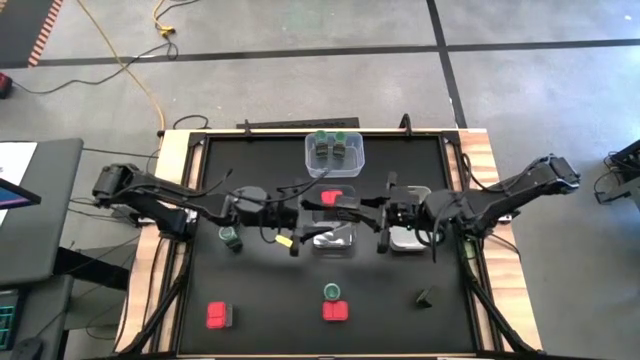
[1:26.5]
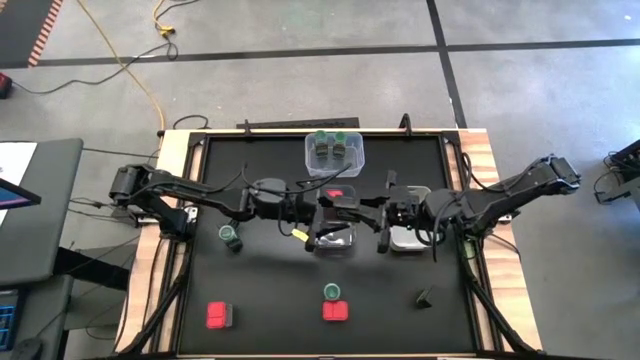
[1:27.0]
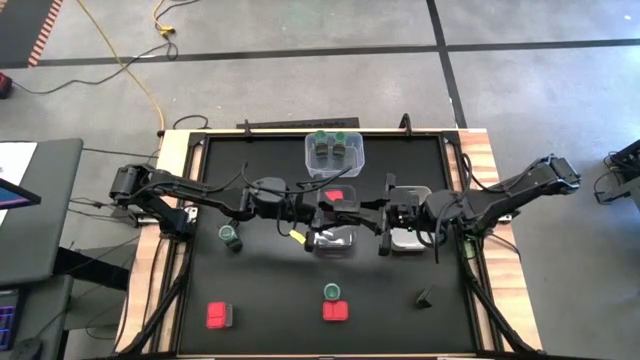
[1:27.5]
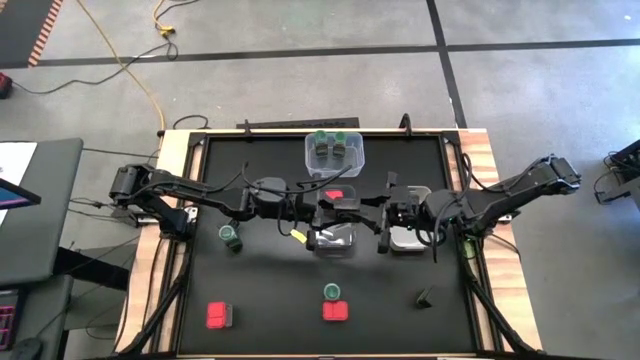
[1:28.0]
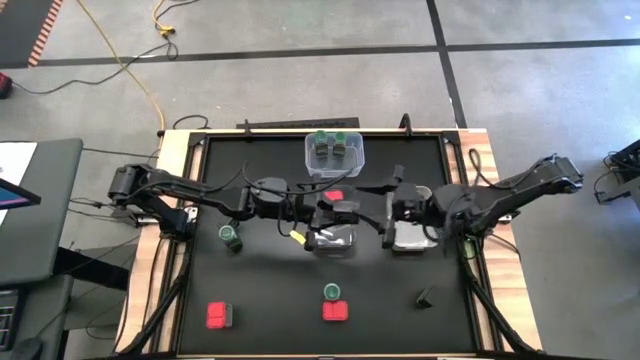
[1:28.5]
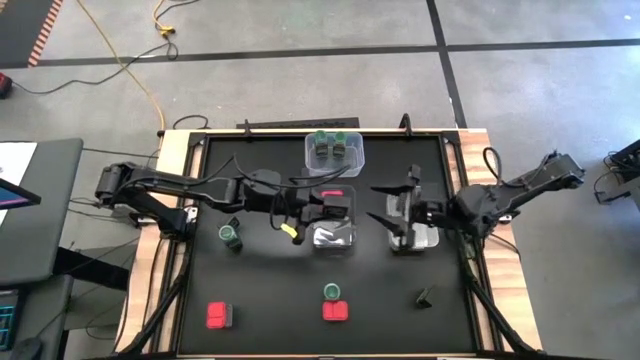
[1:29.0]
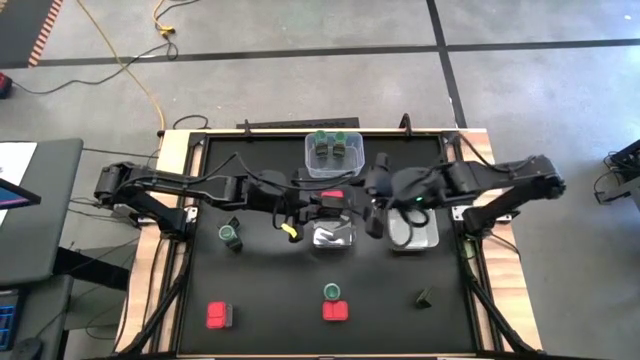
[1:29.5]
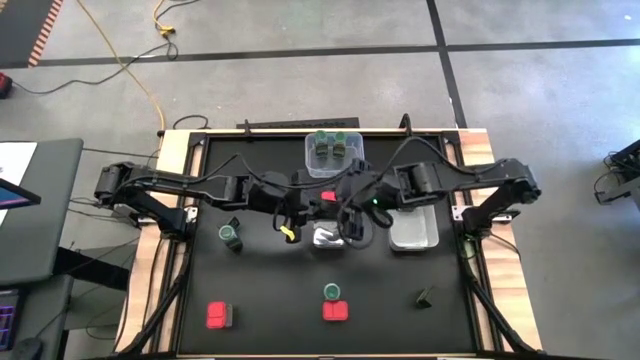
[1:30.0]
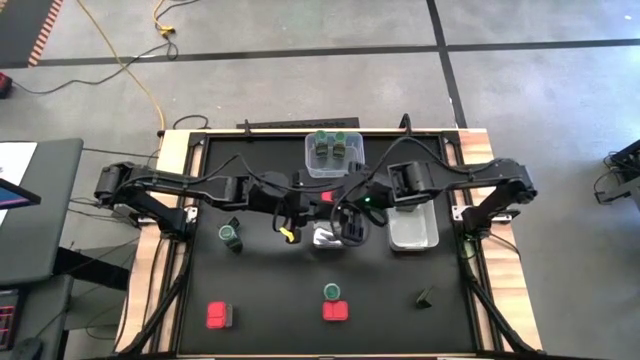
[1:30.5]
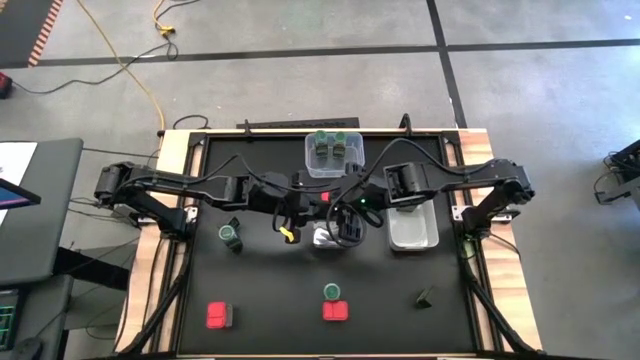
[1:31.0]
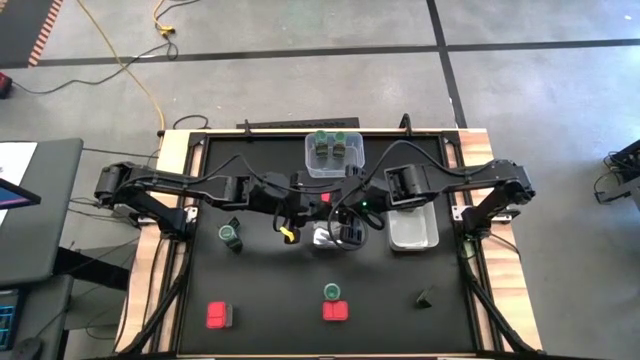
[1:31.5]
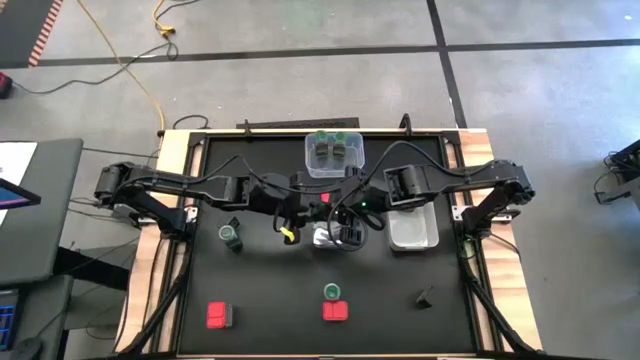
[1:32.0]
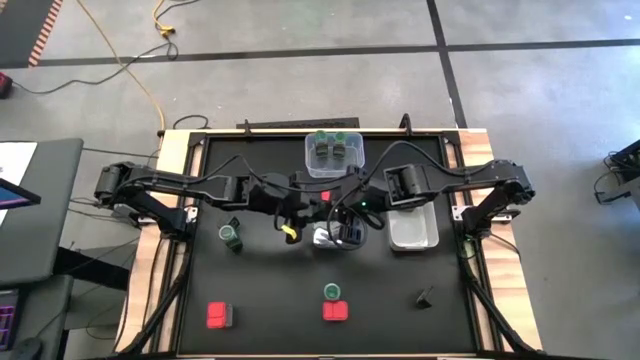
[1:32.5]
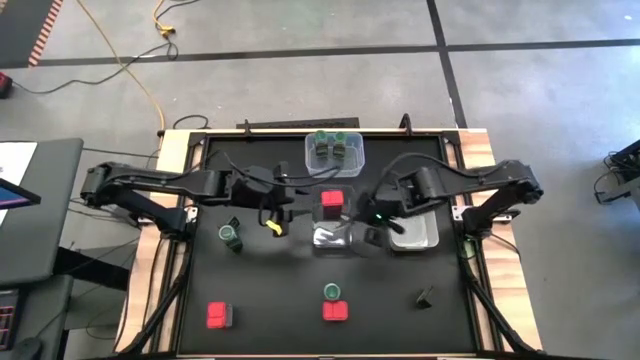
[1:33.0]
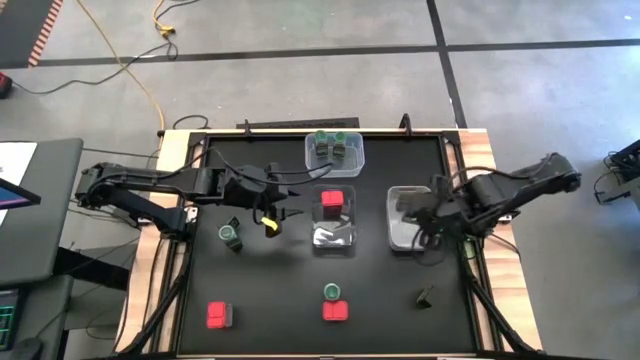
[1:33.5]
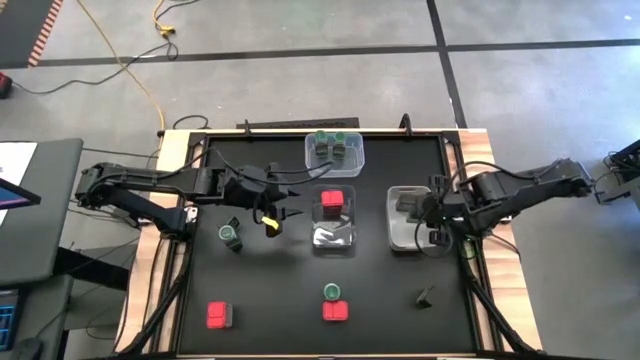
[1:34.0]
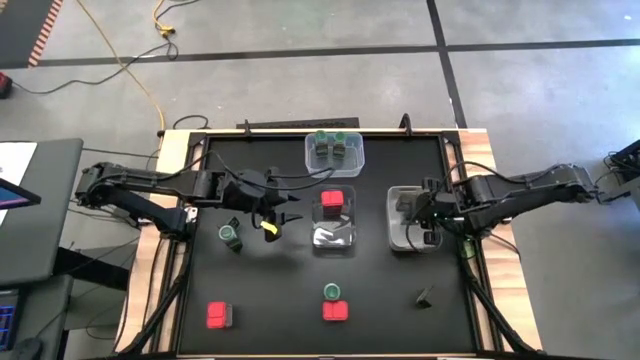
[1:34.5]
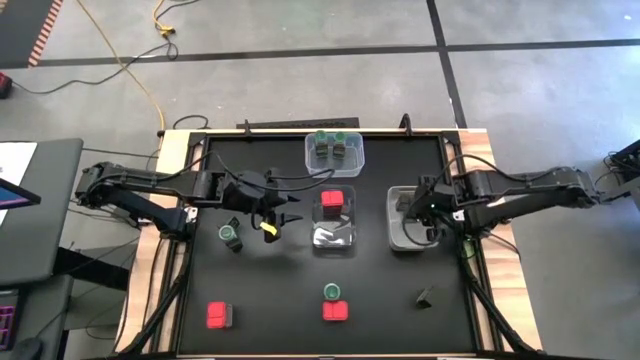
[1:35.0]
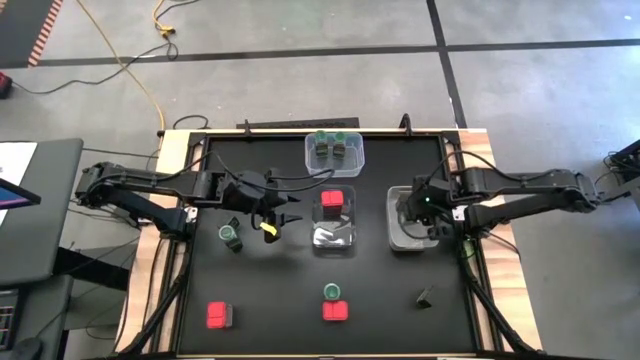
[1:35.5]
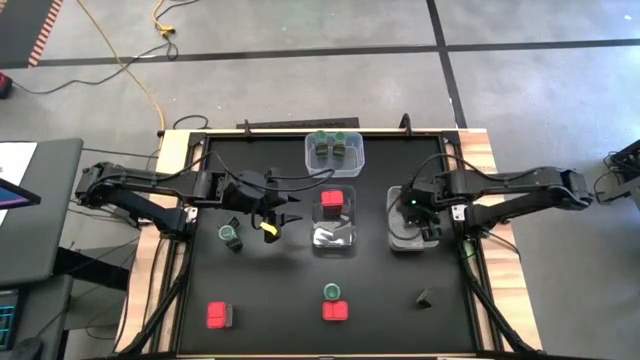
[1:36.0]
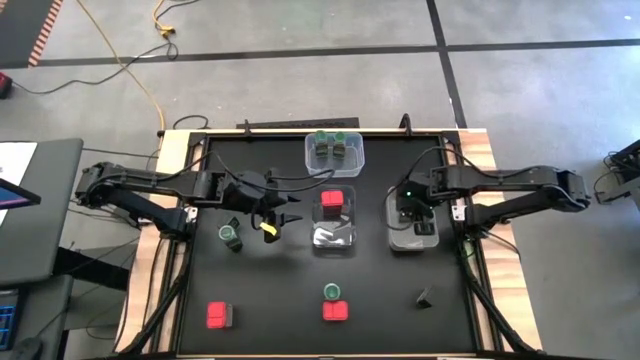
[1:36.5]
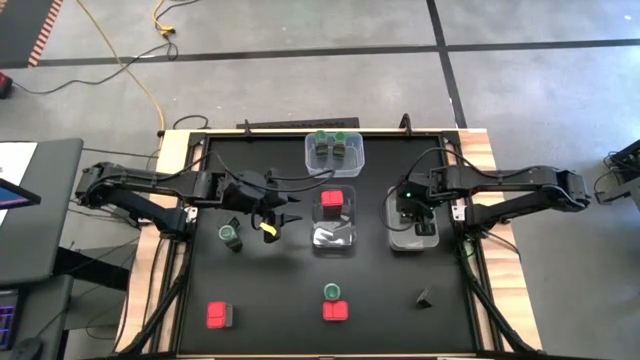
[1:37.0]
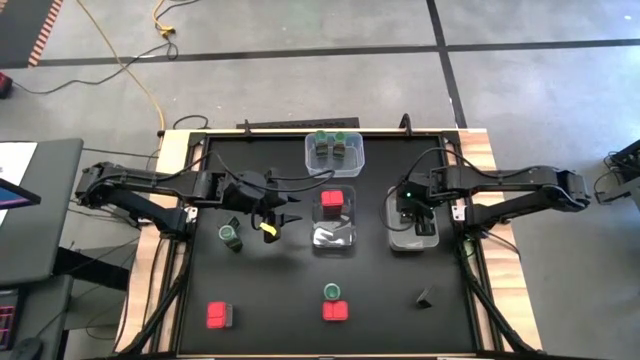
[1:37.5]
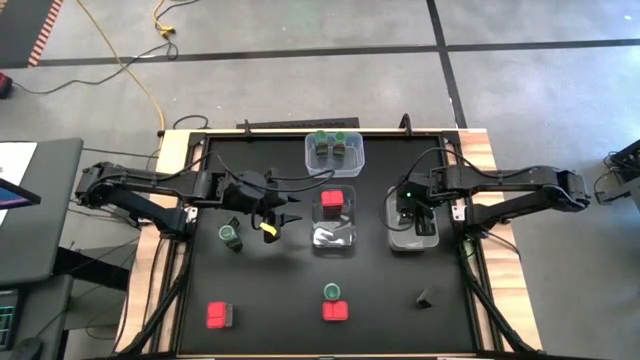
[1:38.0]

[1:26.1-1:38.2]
Task: Sort spices by type
Put the black seasoning can into the gray bin

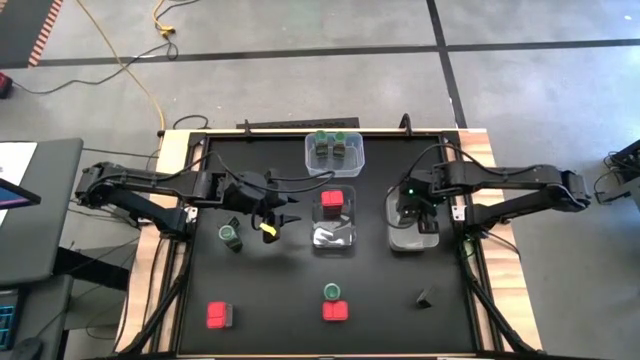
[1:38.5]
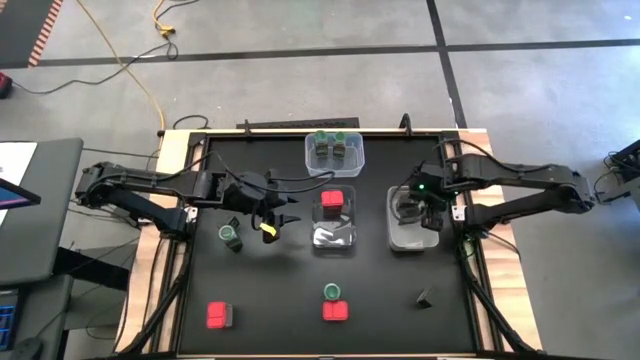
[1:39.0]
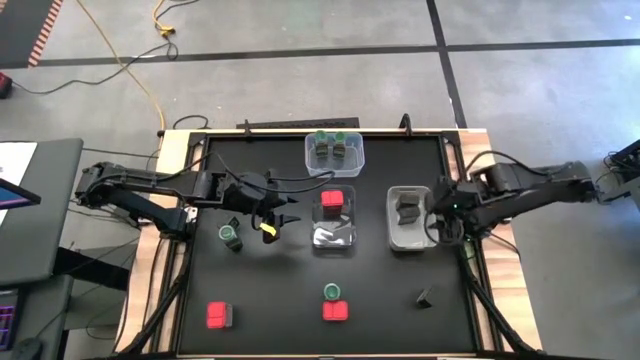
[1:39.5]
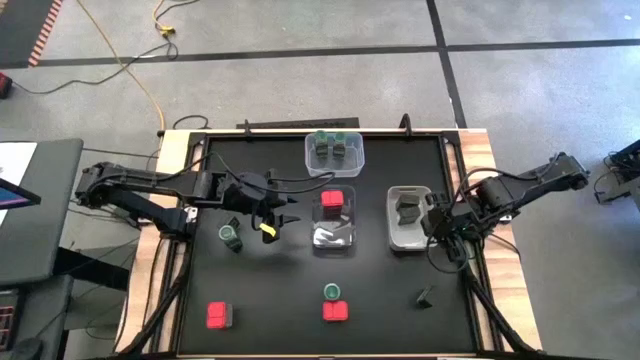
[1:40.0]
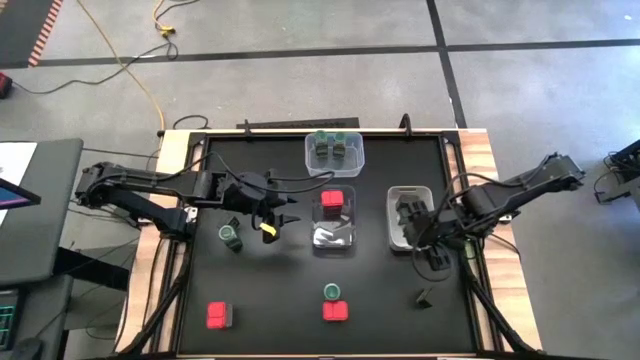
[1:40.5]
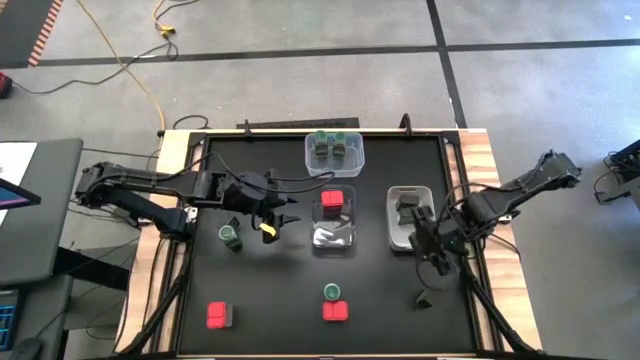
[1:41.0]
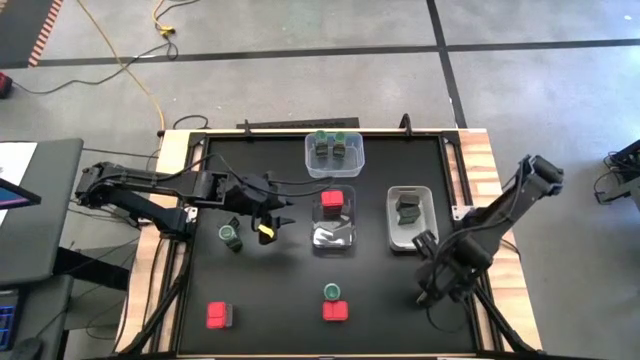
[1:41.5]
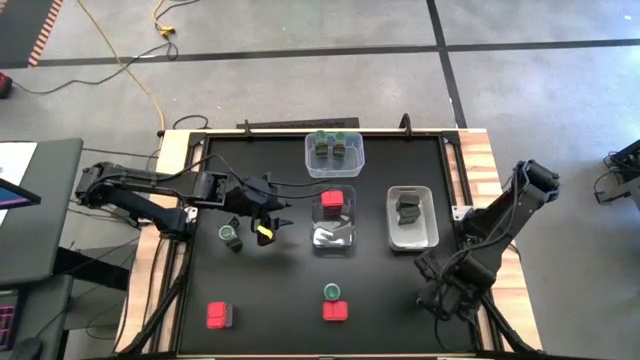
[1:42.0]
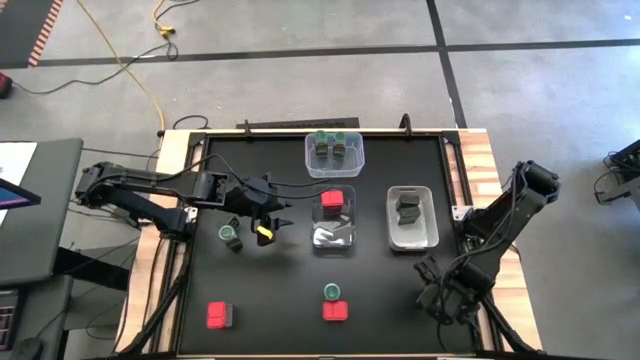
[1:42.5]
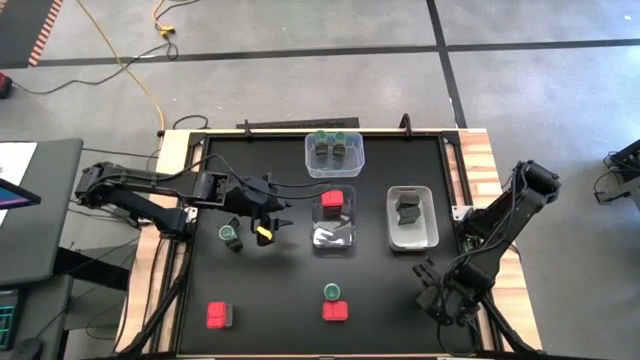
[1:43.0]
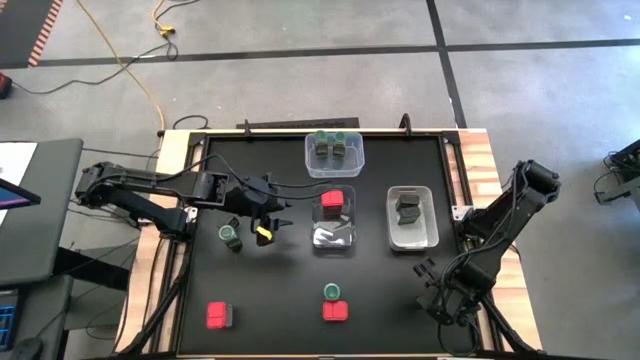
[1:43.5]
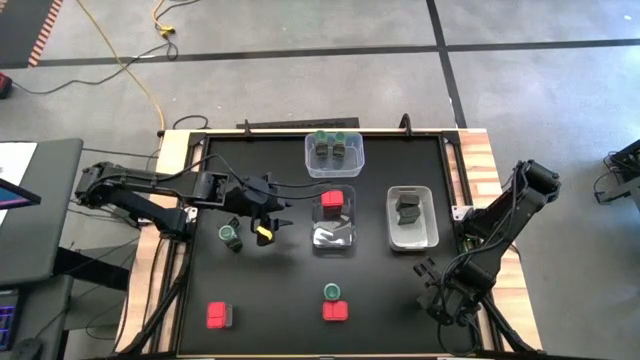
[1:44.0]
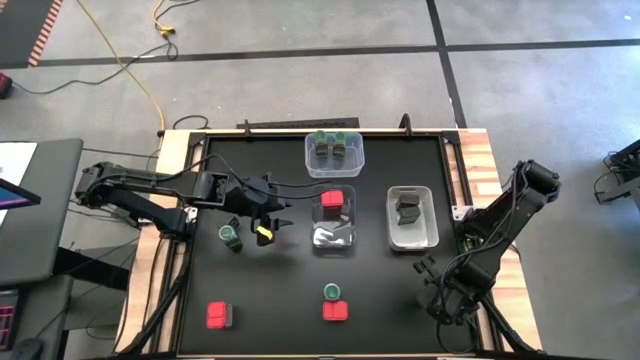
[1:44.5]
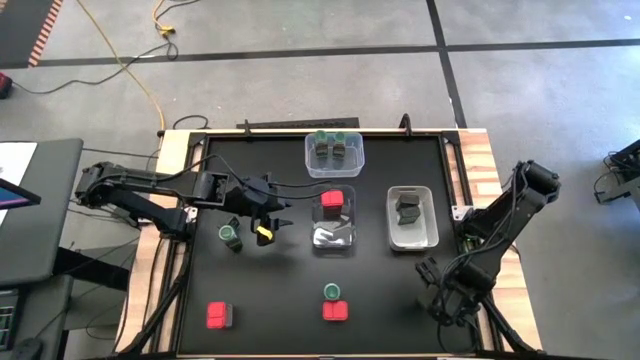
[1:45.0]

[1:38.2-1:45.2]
Put the black seasoning can into the gray bin
